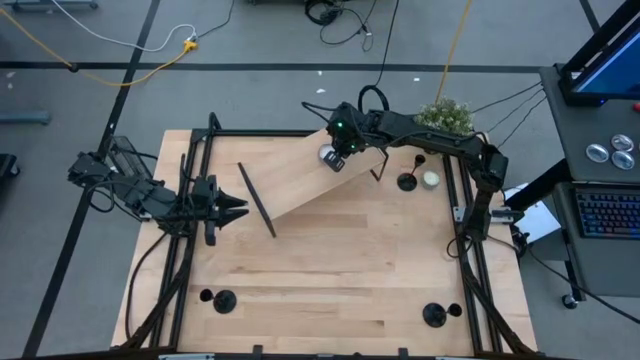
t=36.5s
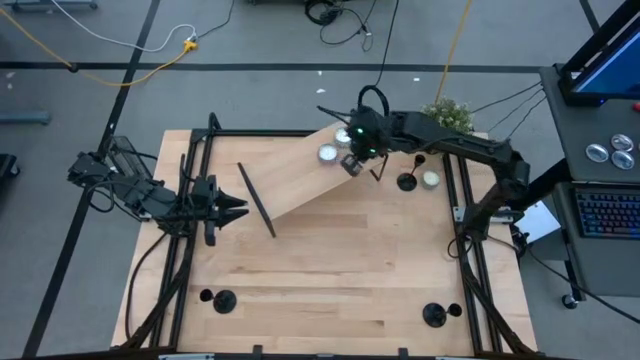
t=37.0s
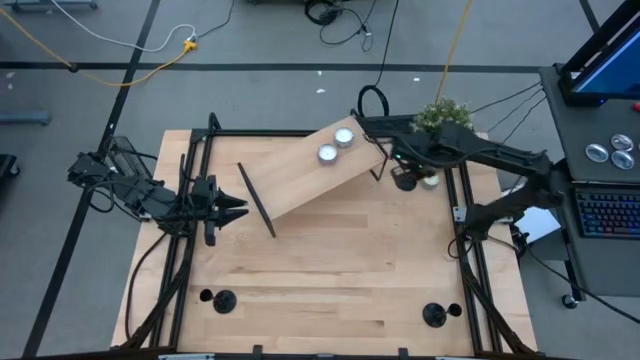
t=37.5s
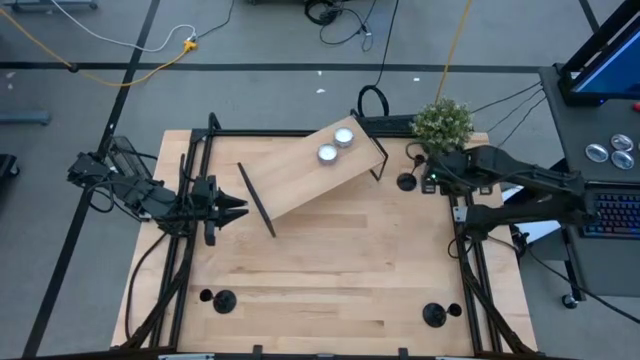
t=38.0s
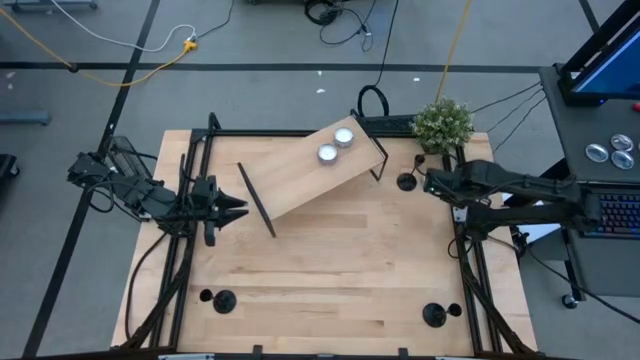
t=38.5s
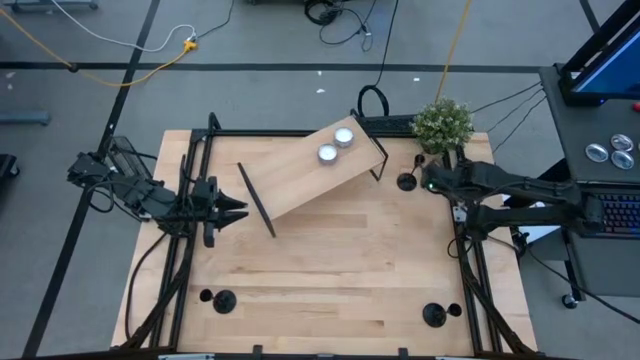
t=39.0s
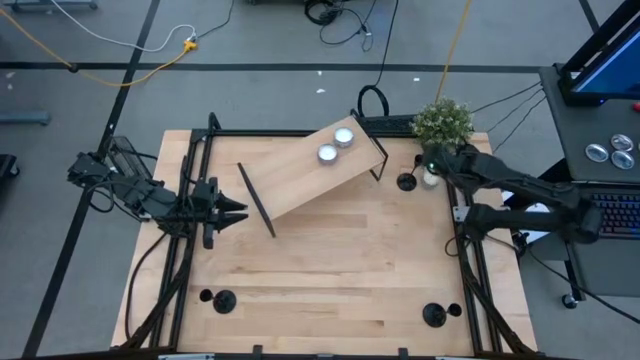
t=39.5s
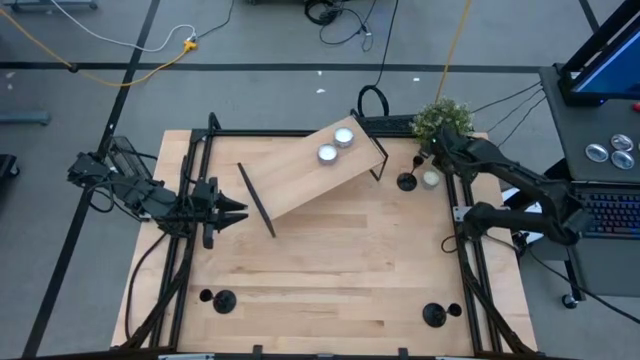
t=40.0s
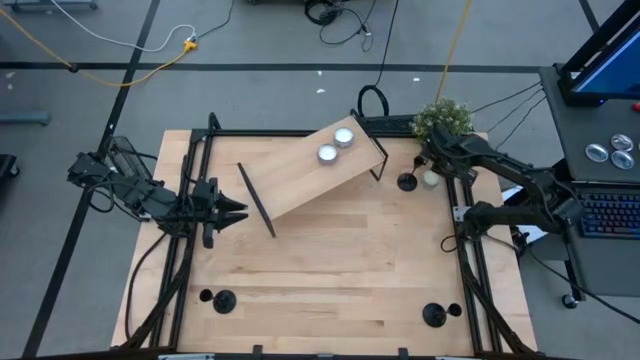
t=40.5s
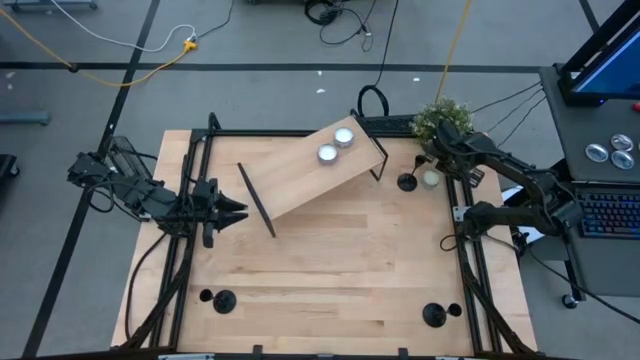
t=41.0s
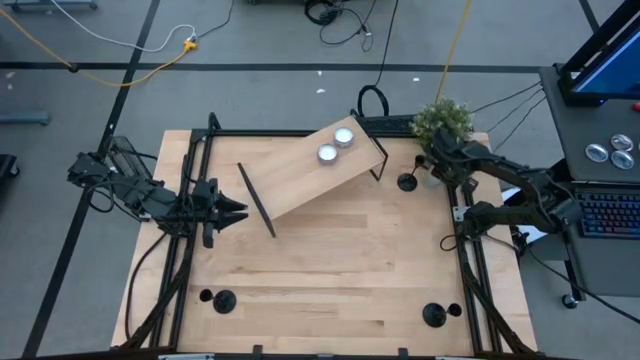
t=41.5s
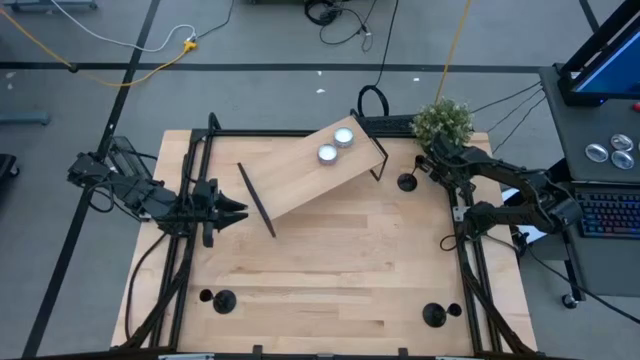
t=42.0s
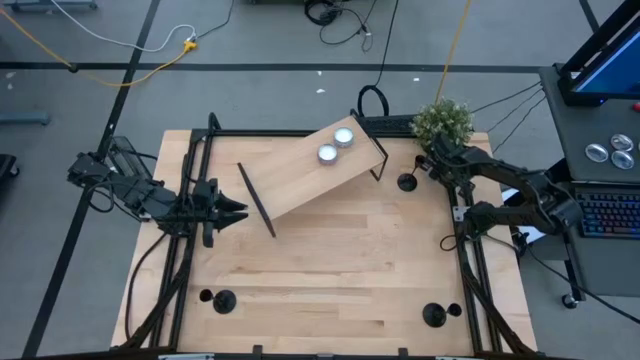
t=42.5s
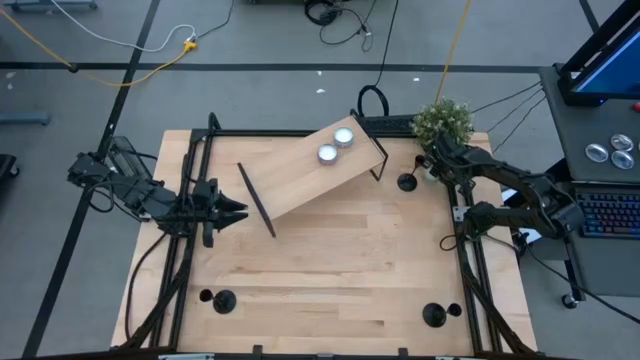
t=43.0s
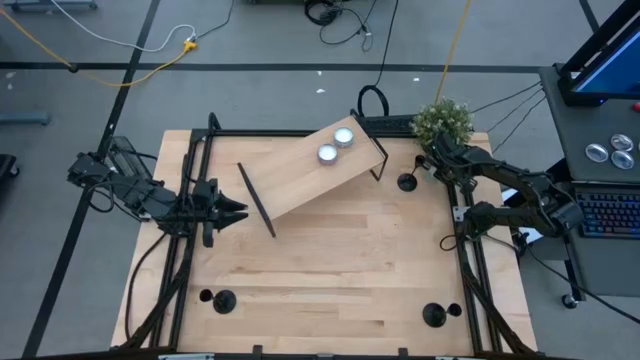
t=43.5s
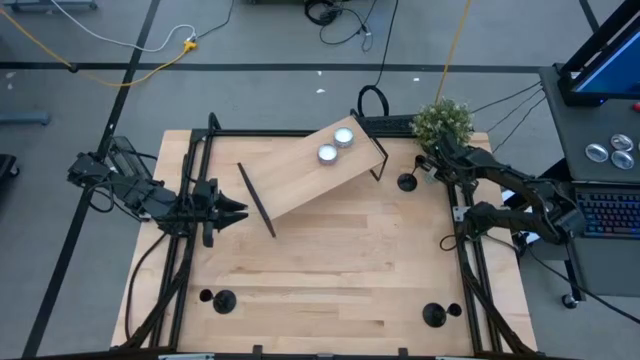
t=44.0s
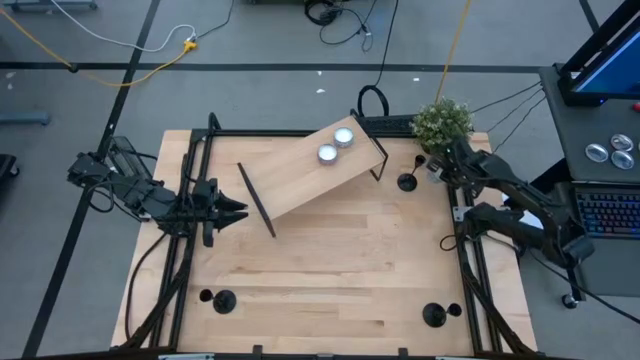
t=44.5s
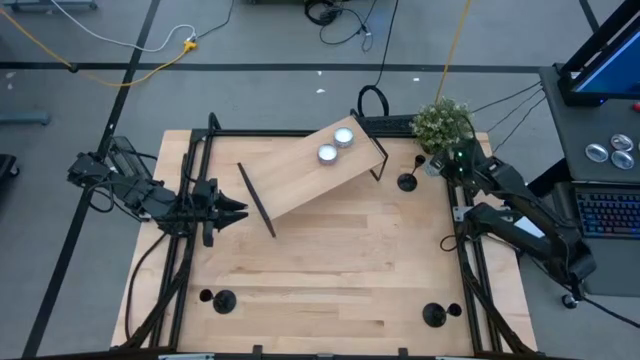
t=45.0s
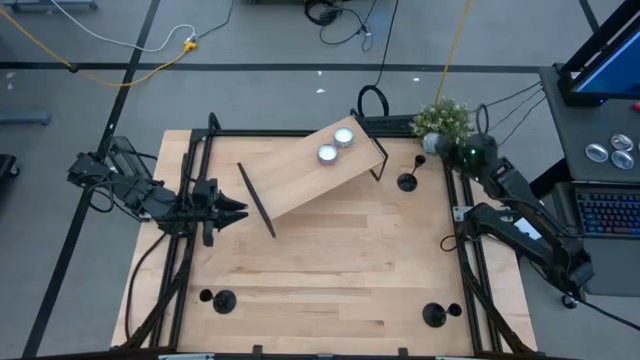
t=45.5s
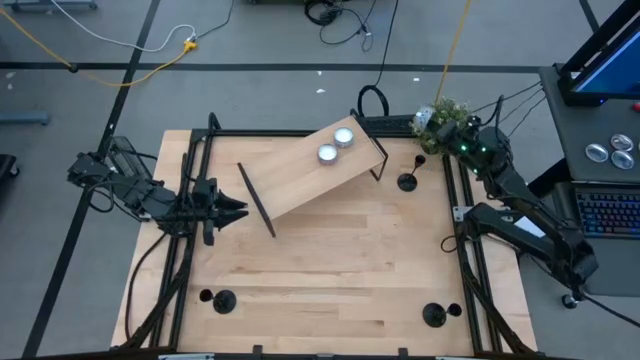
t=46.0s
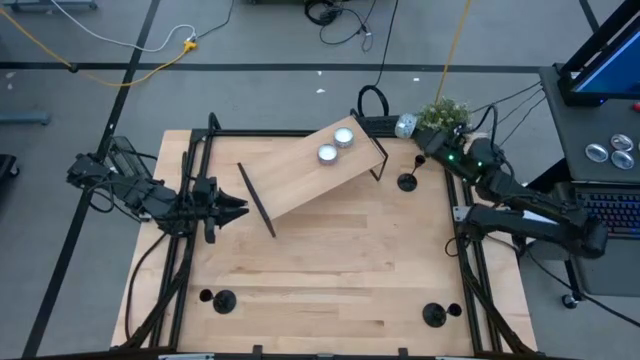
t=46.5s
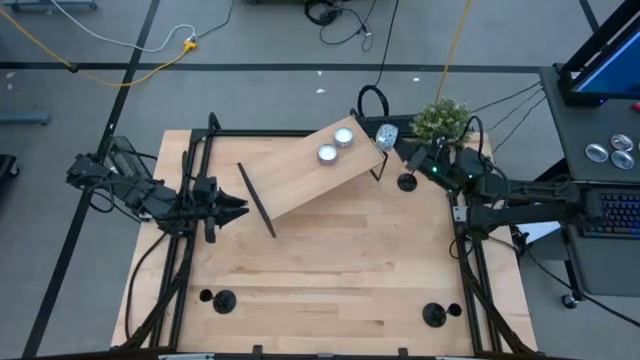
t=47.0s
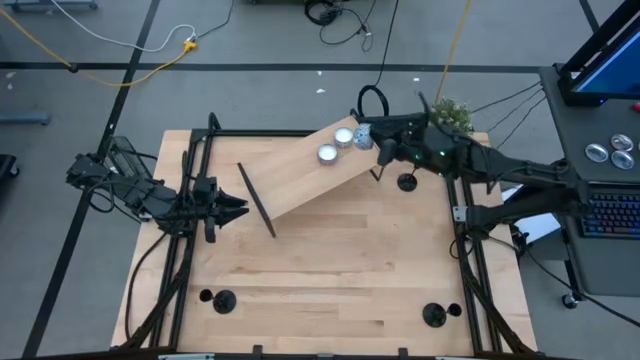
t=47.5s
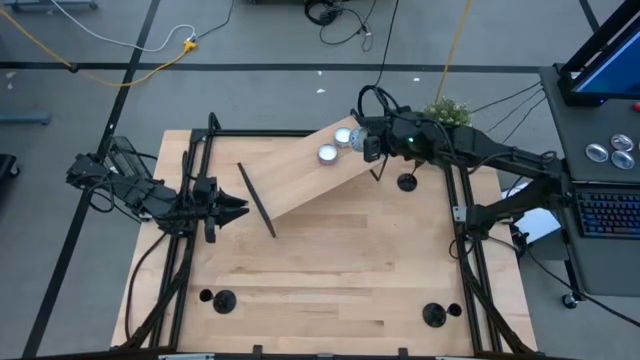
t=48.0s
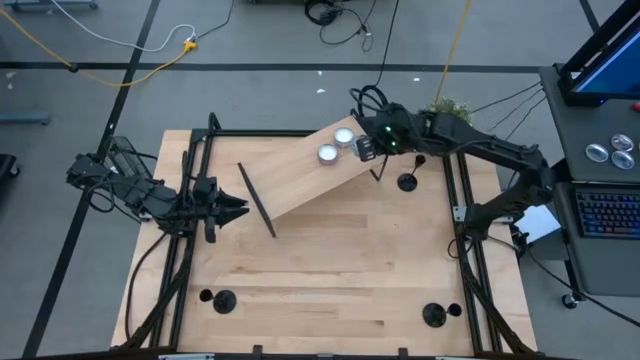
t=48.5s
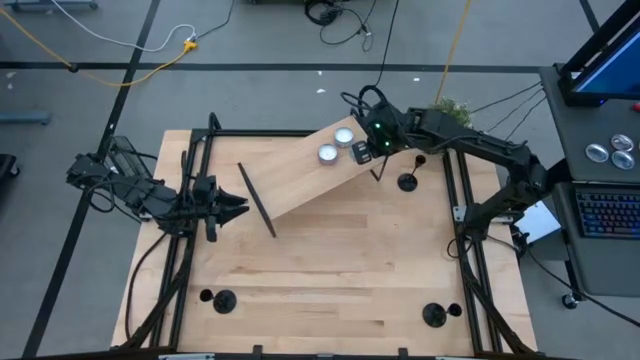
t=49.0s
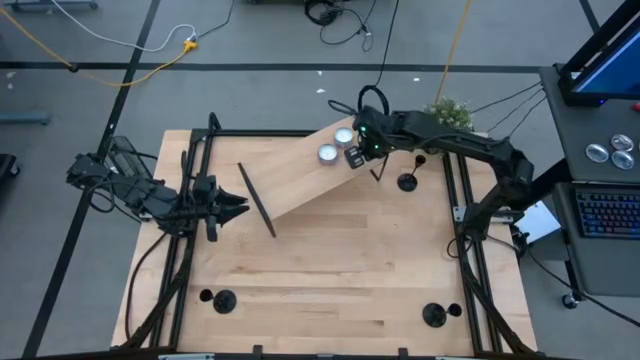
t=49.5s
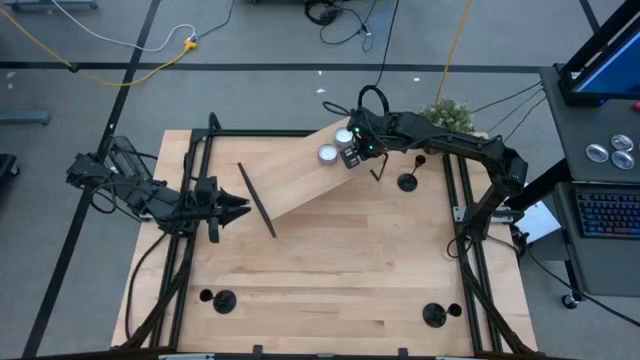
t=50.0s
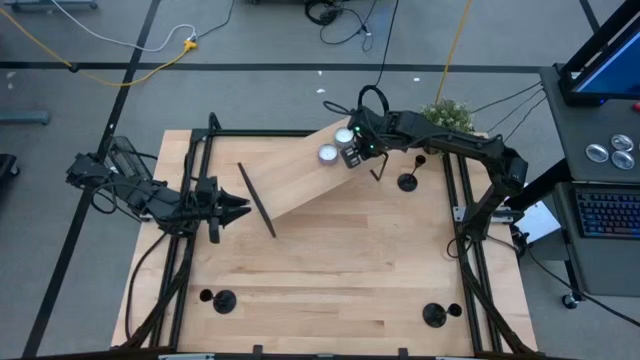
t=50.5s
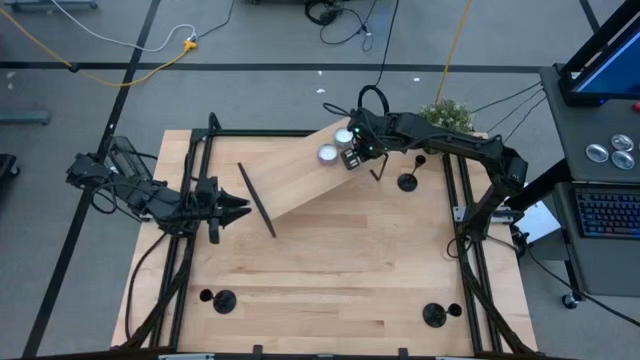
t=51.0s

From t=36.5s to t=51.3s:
Task: Pick & Place candle stick holders
Put the blue scented candle on the shelf
